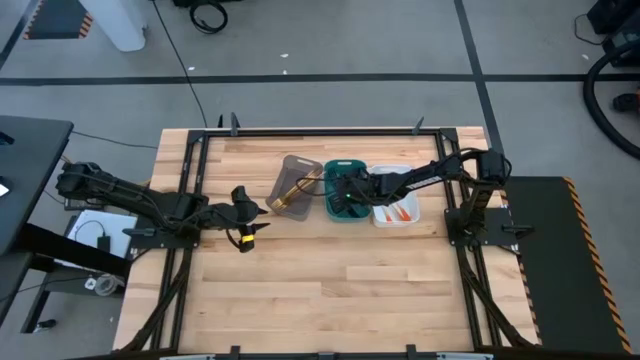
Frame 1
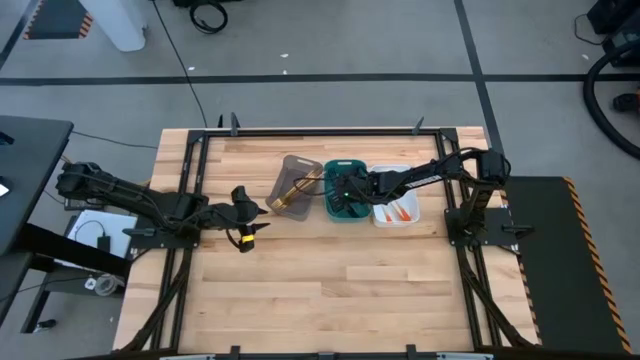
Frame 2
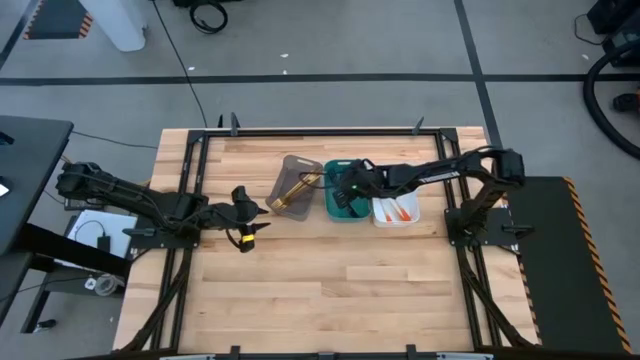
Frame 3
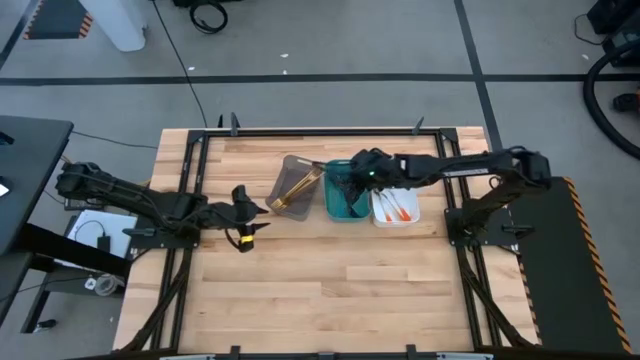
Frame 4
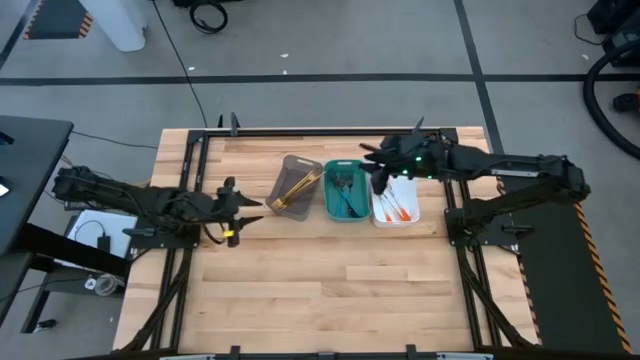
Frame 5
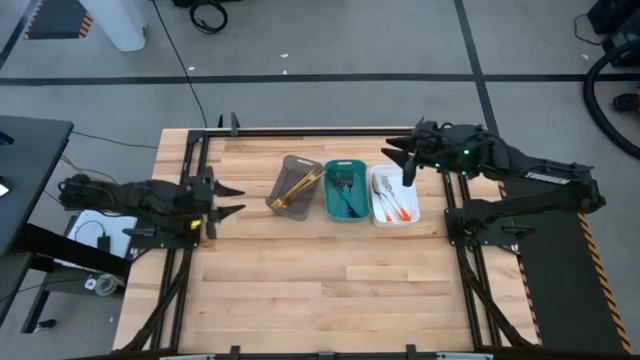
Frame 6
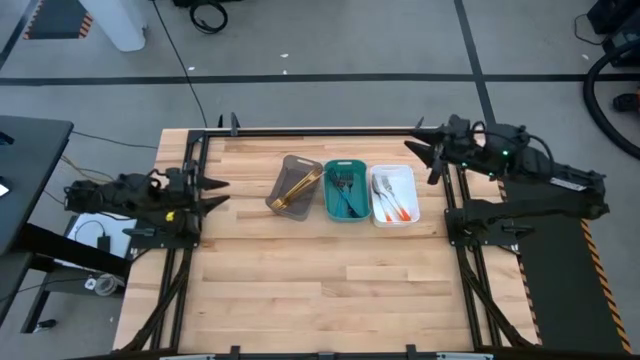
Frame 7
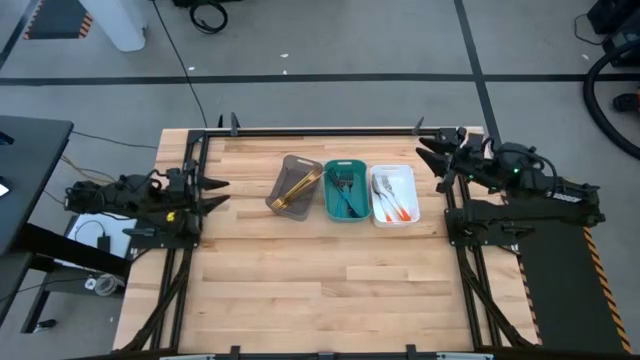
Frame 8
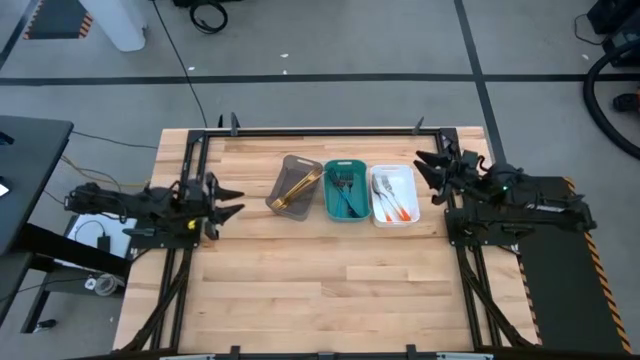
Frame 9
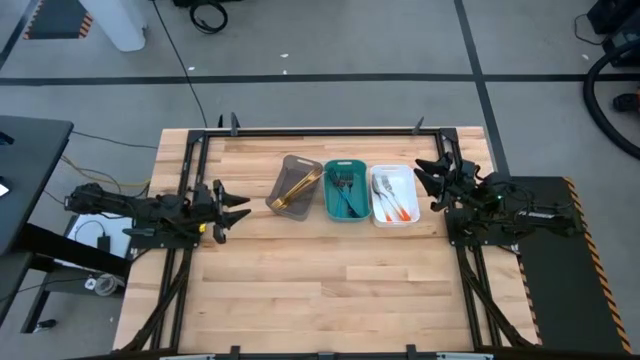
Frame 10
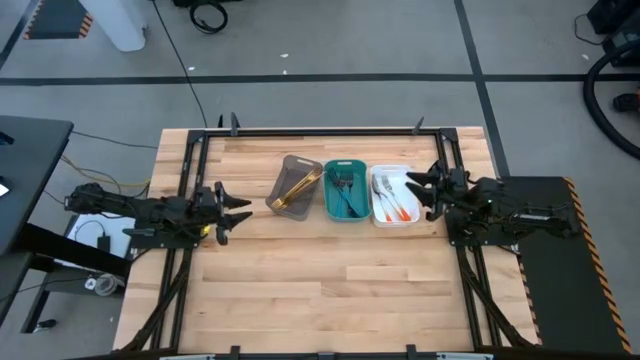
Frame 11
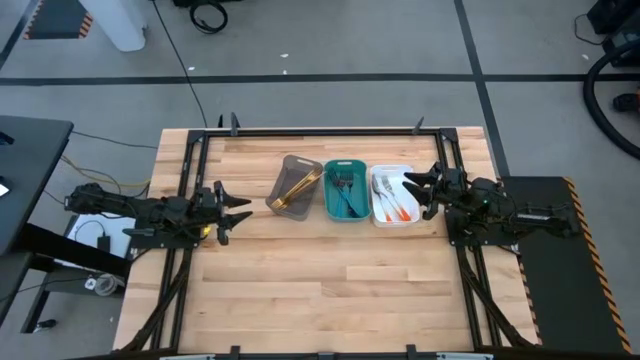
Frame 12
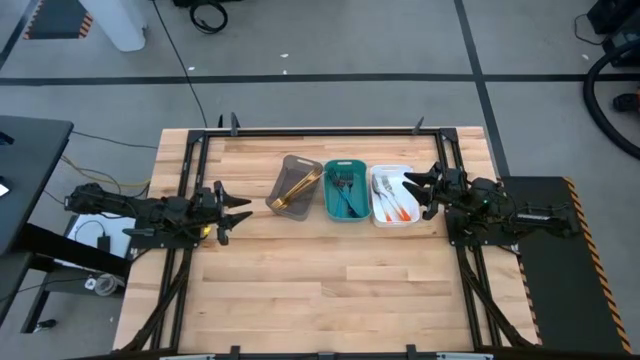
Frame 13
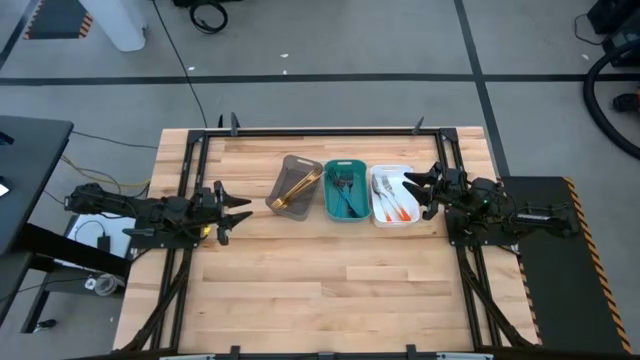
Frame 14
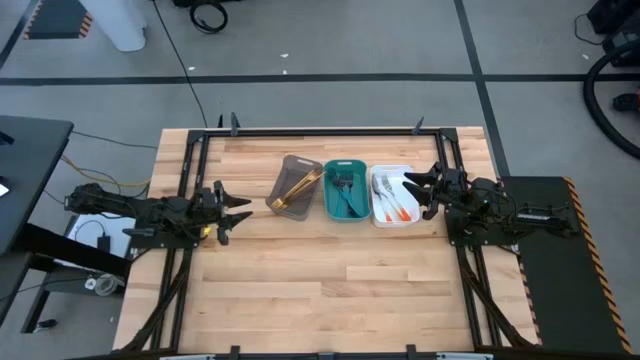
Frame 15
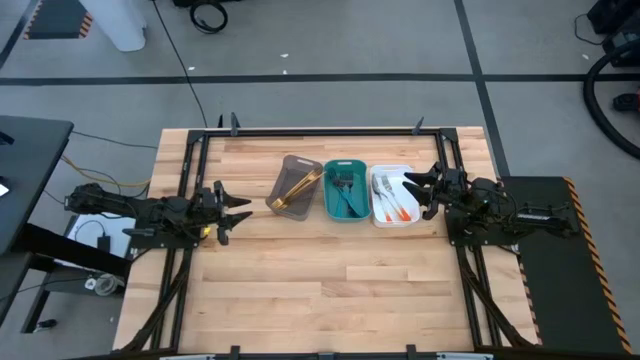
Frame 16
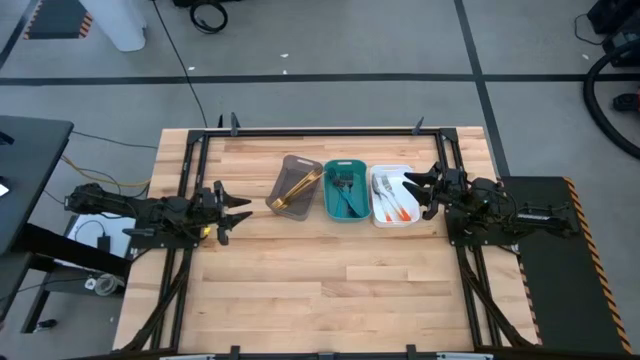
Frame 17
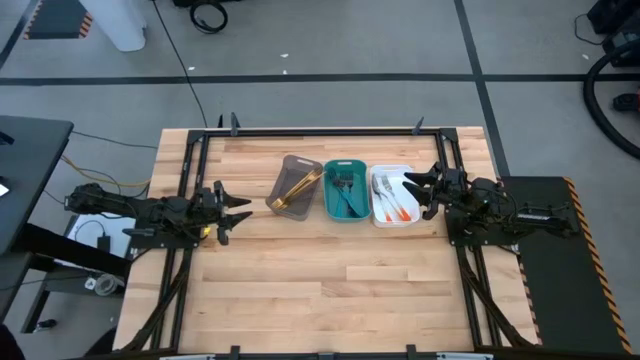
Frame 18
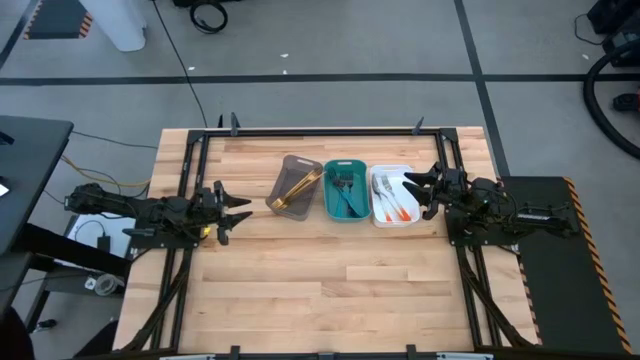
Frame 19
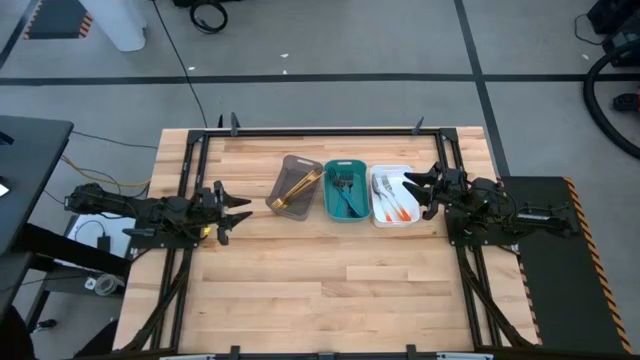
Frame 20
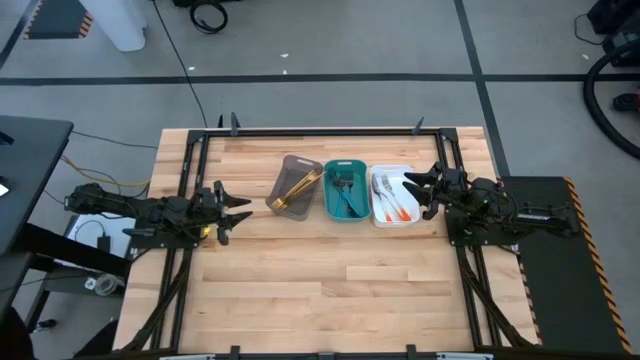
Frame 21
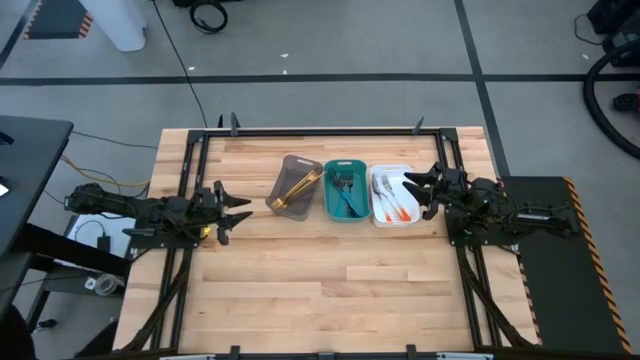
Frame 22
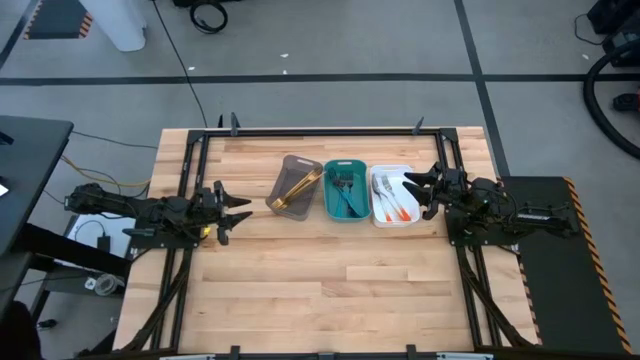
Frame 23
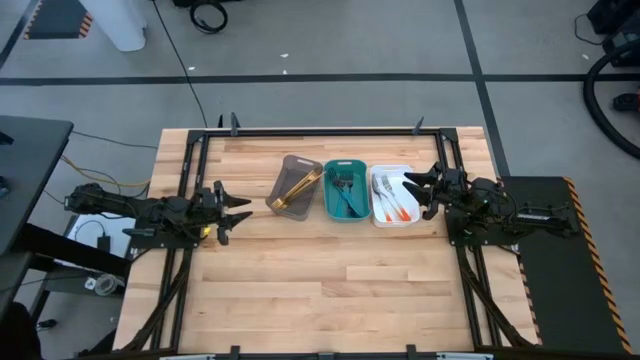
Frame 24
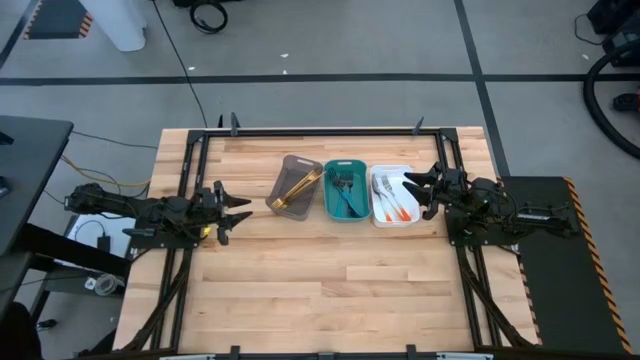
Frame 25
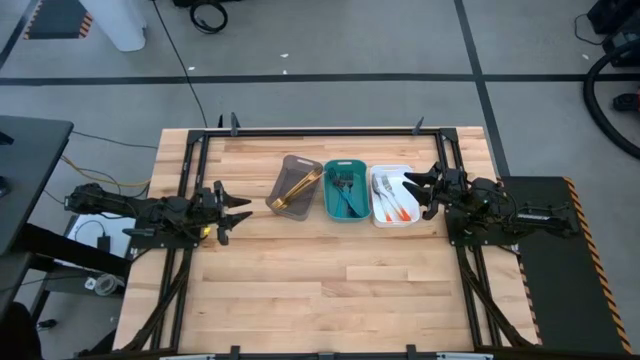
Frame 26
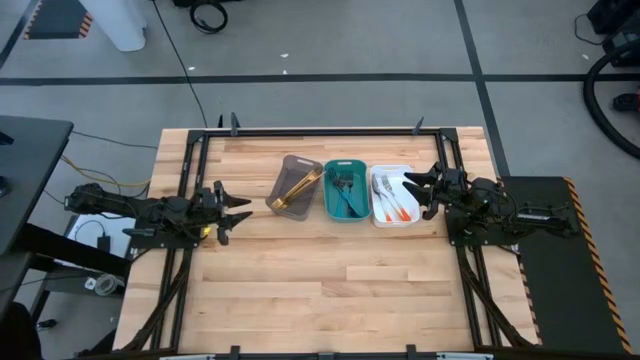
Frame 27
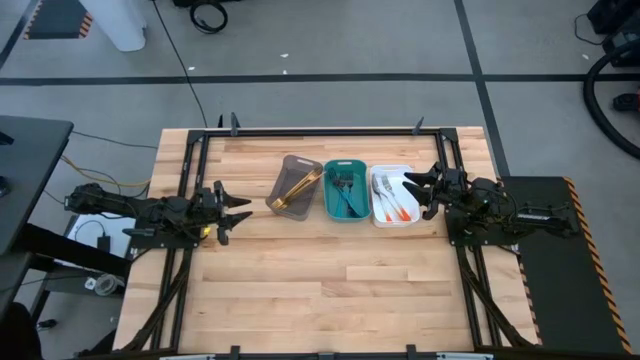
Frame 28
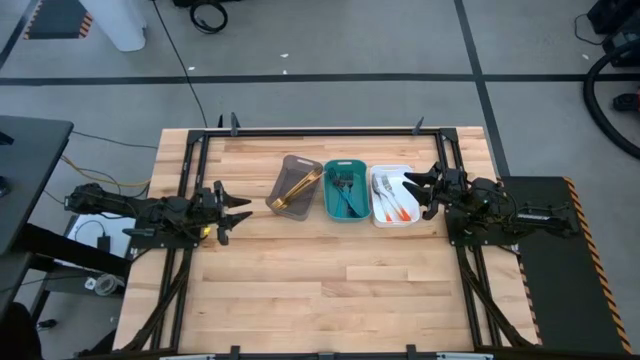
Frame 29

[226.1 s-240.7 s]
Task: Sort silverware by color (type)
Return to Home Position

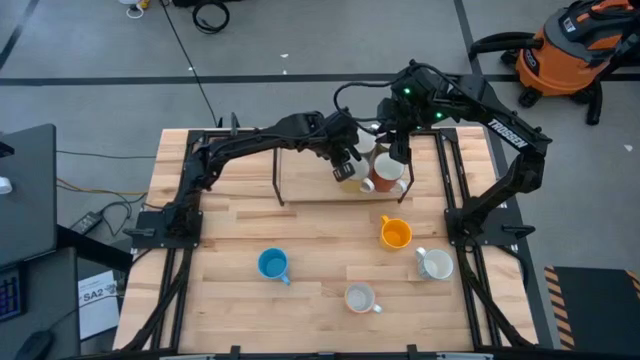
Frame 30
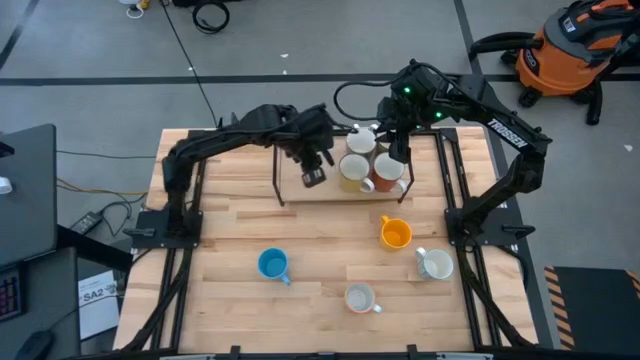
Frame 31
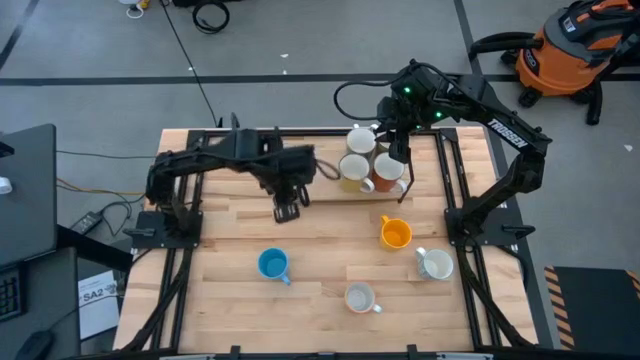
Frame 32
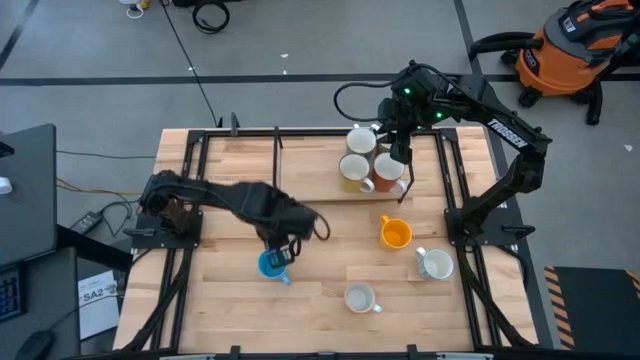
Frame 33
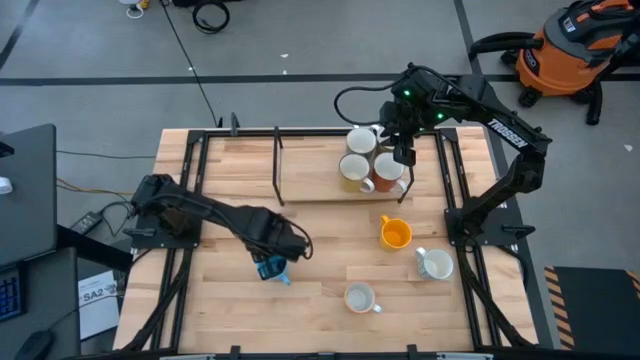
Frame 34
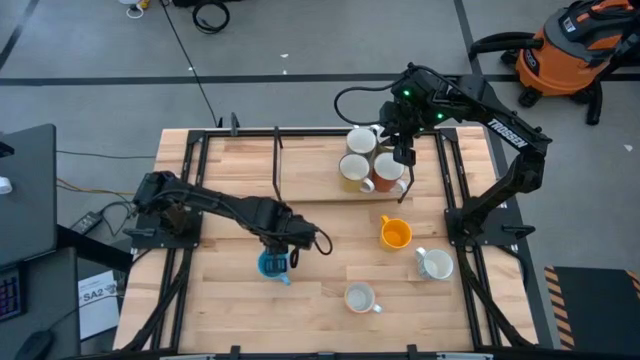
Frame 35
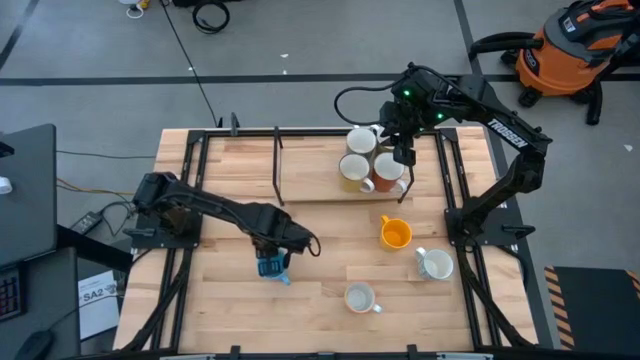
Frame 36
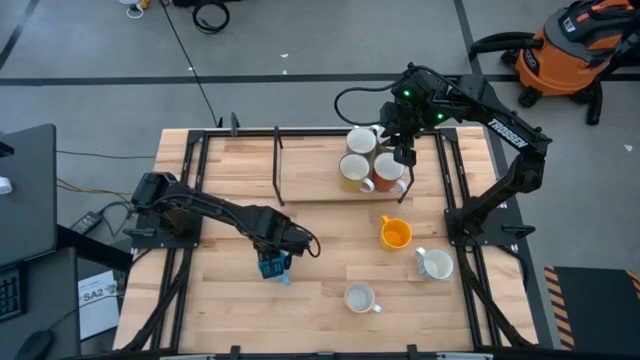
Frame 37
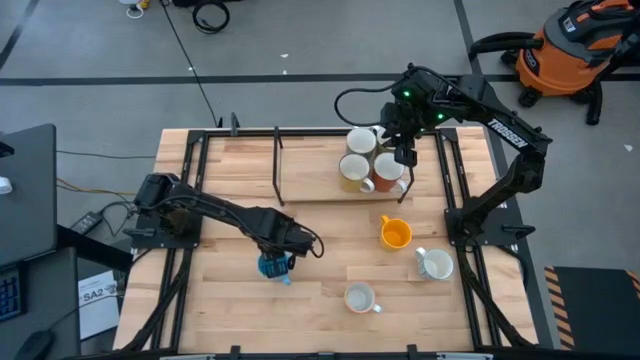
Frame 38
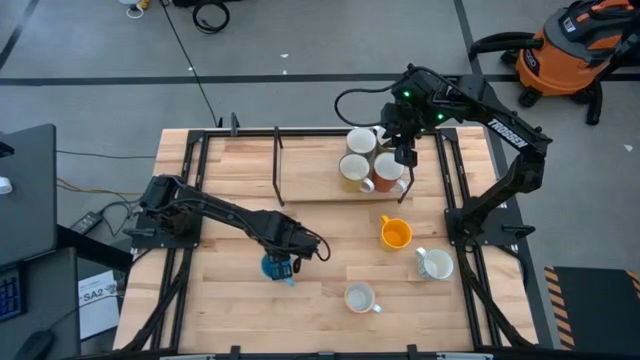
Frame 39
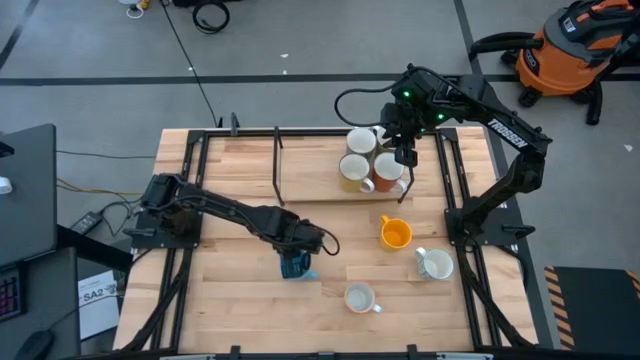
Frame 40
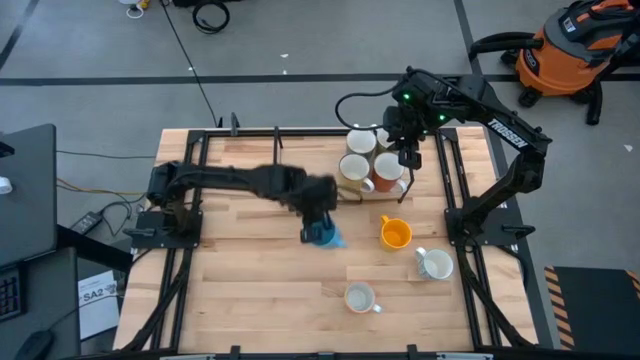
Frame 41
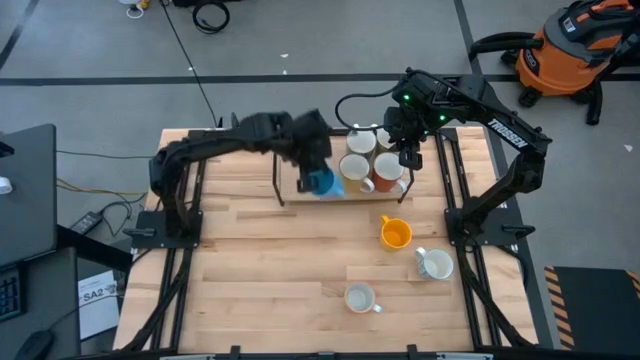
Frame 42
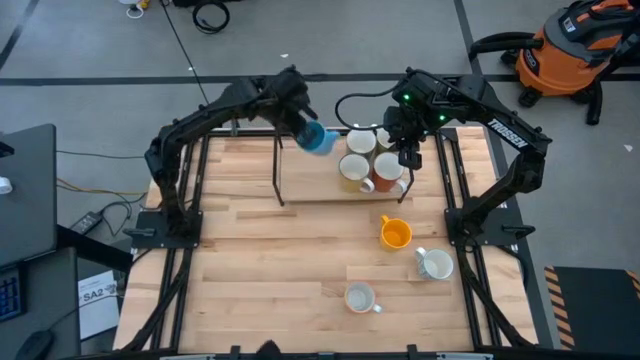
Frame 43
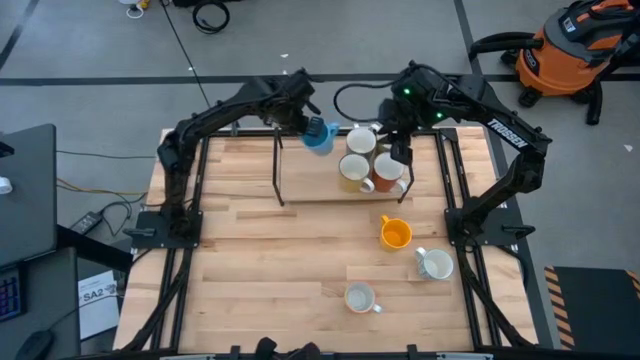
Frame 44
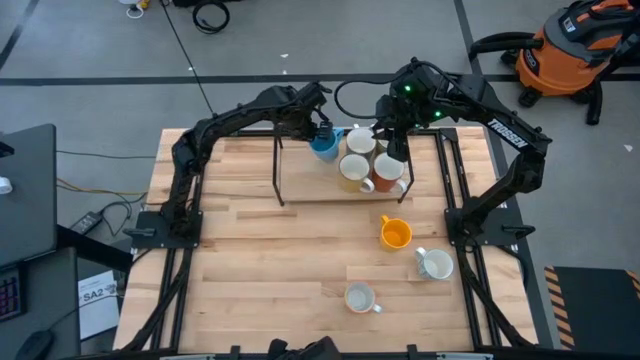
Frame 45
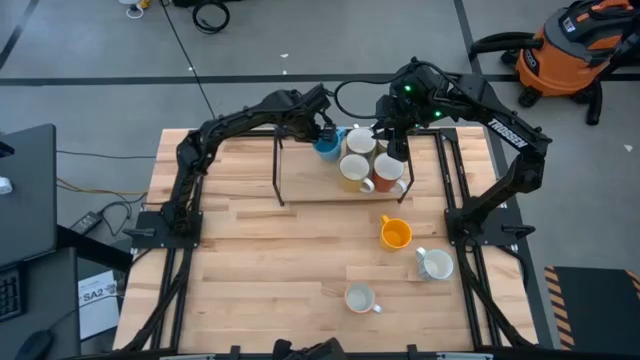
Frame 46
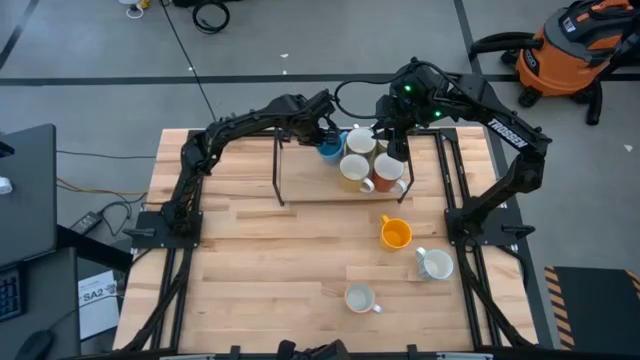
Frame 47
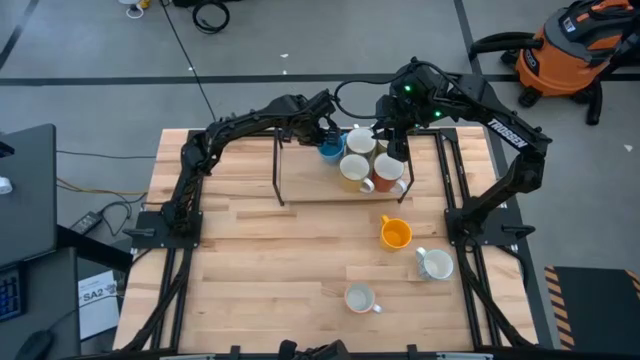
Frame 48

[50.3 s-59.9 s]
Task: Place coffee mugs
Put the leftmost blue cup on the shelf
